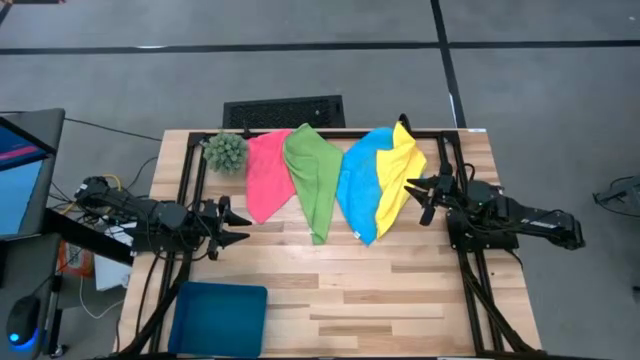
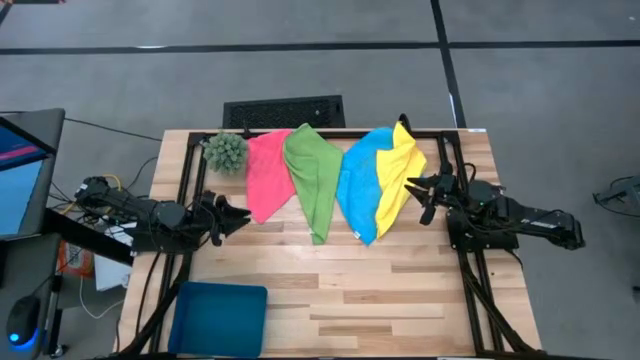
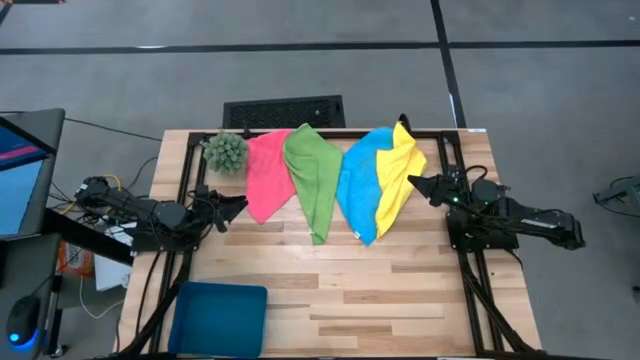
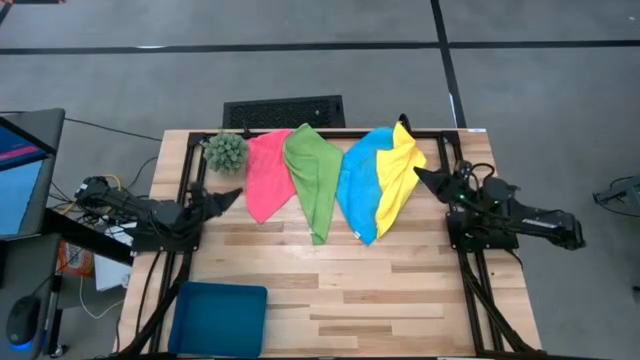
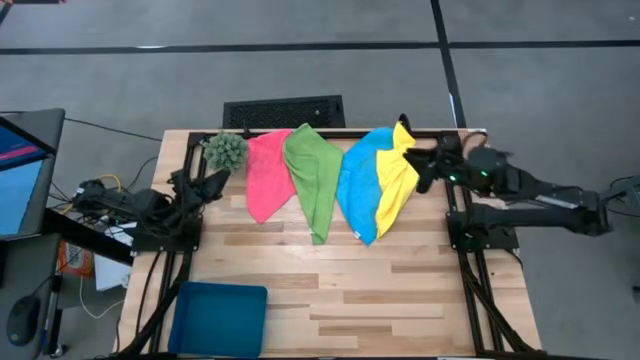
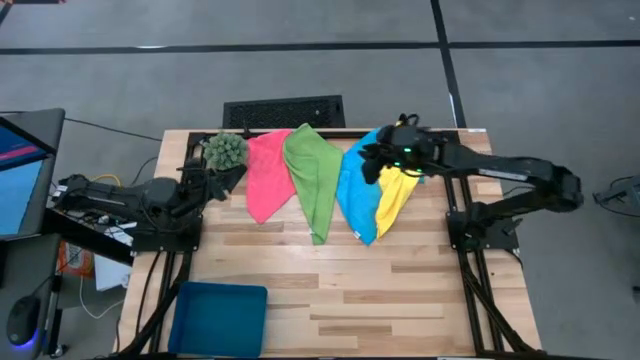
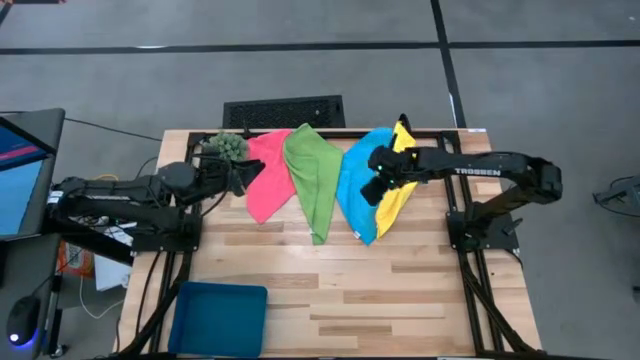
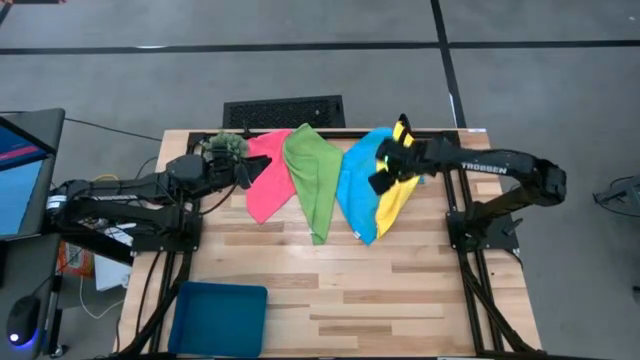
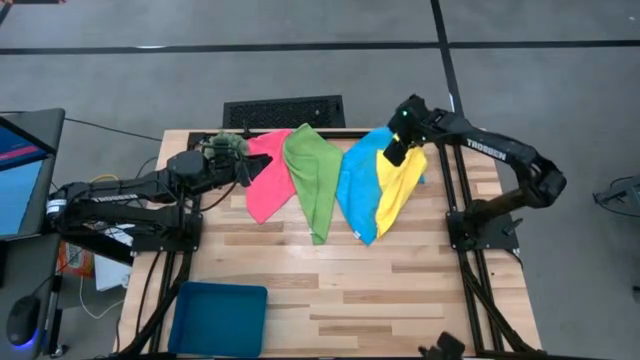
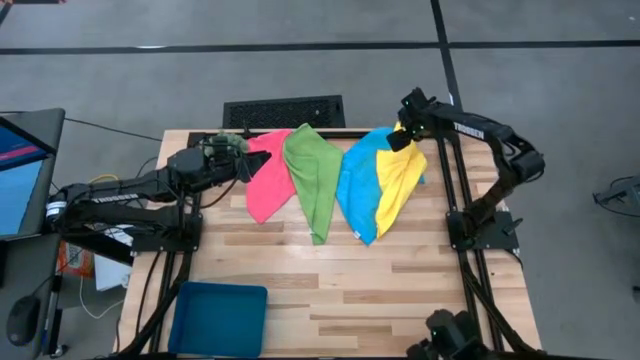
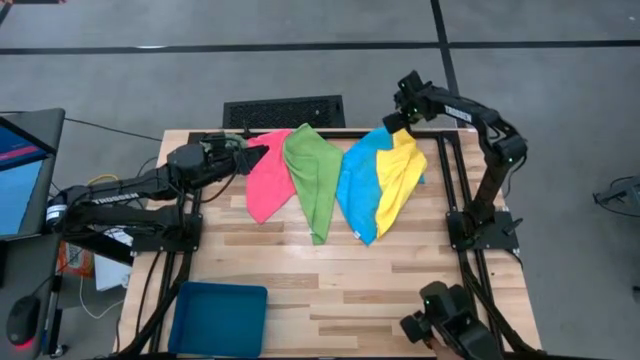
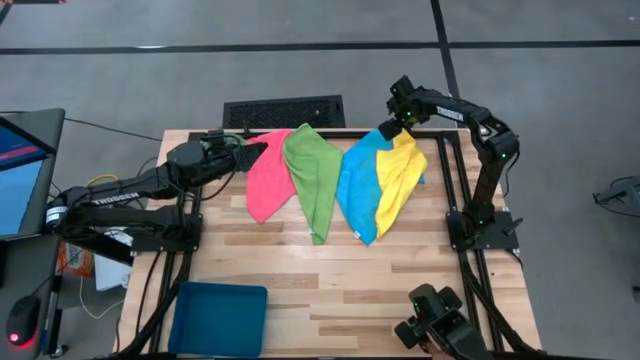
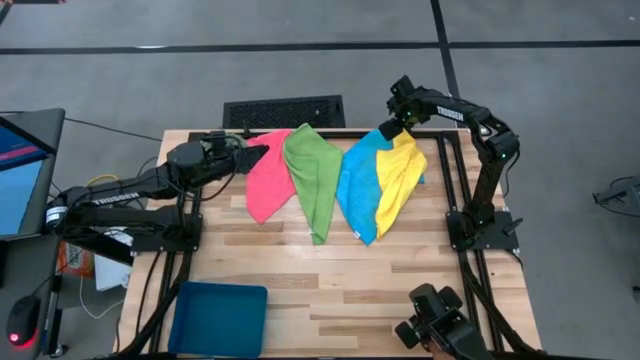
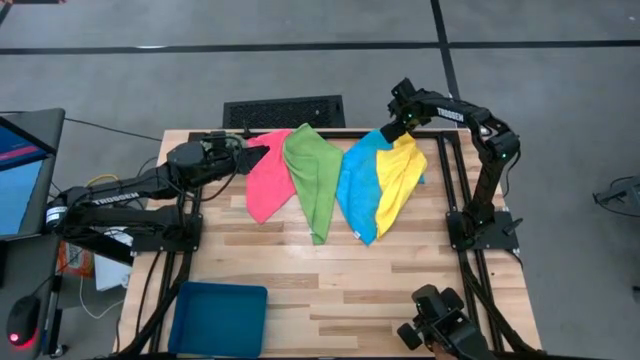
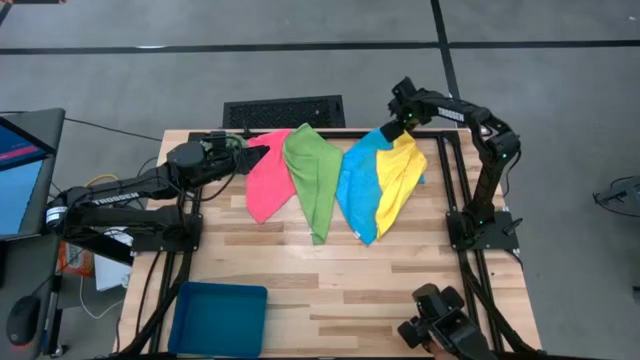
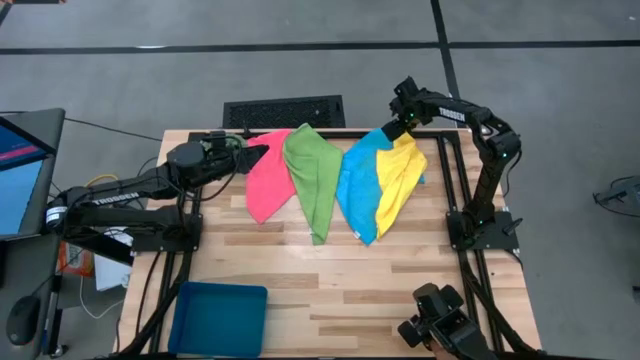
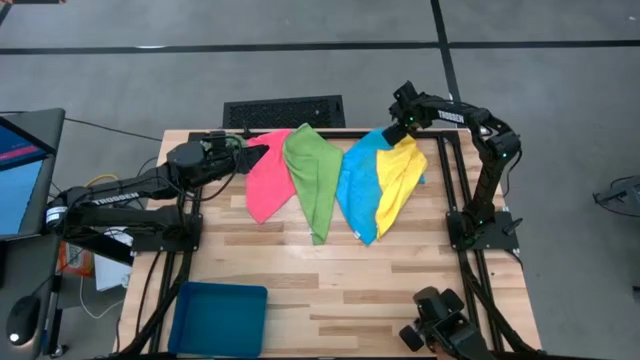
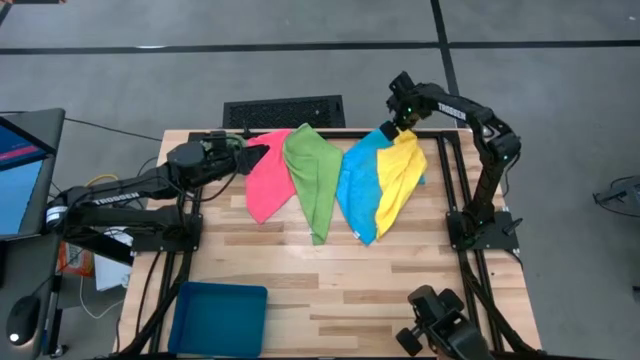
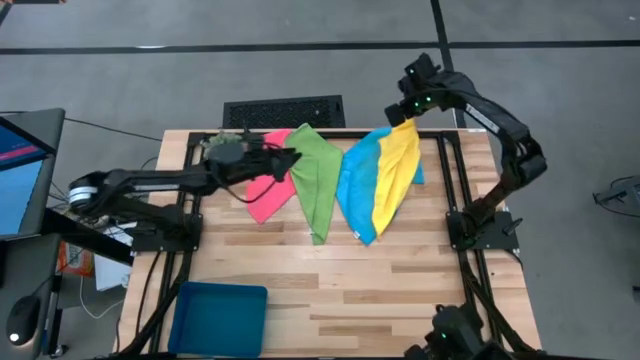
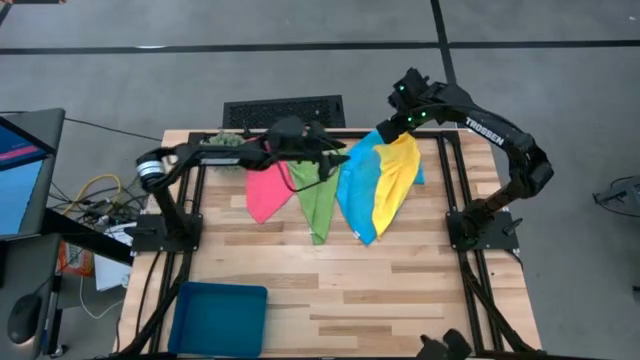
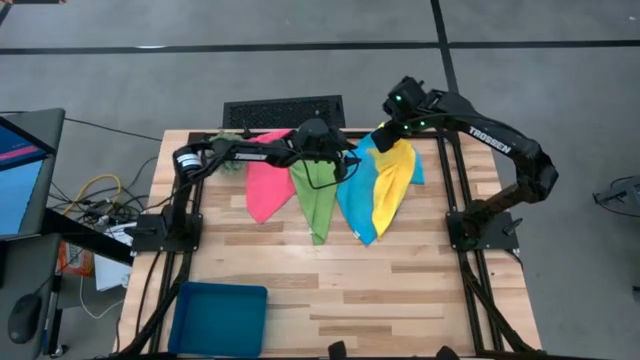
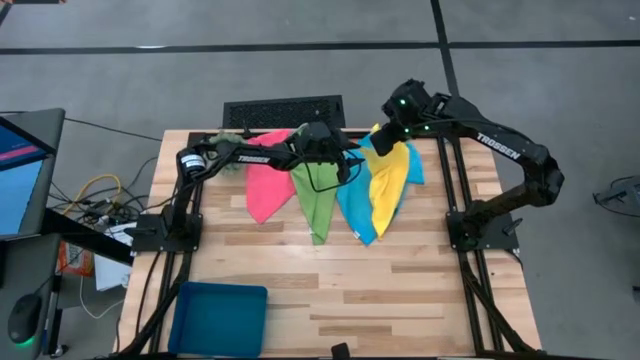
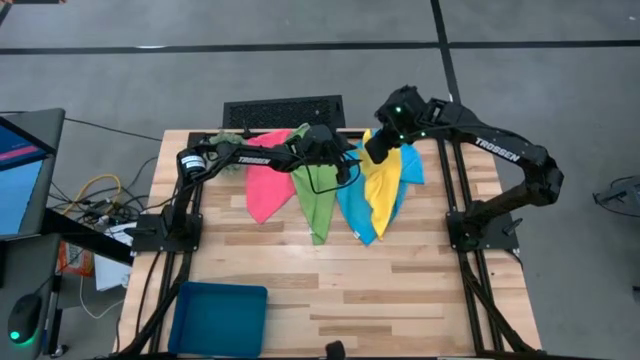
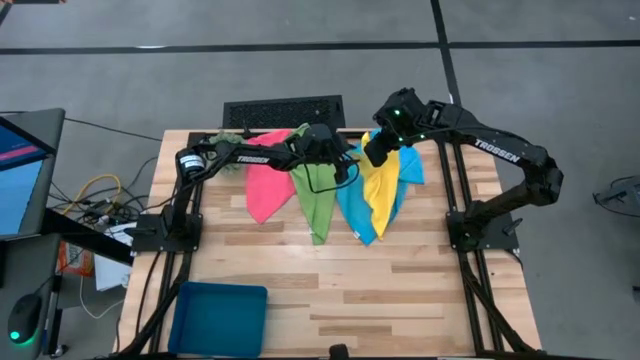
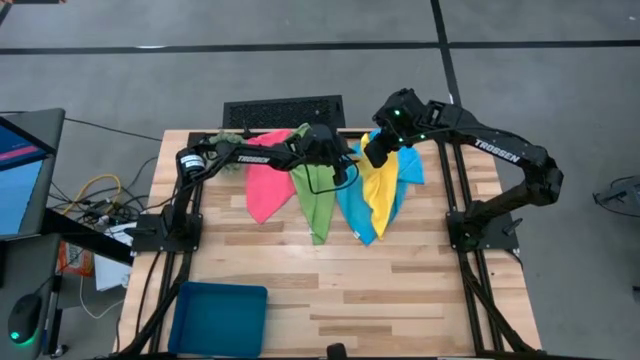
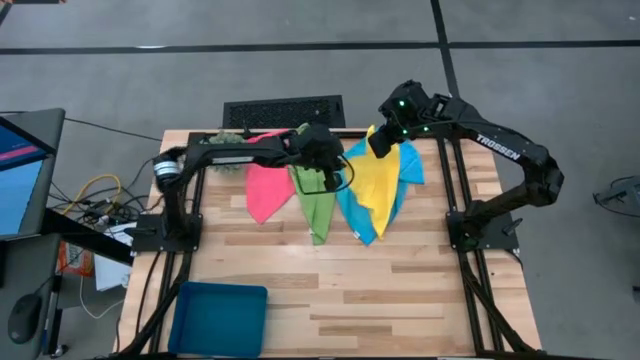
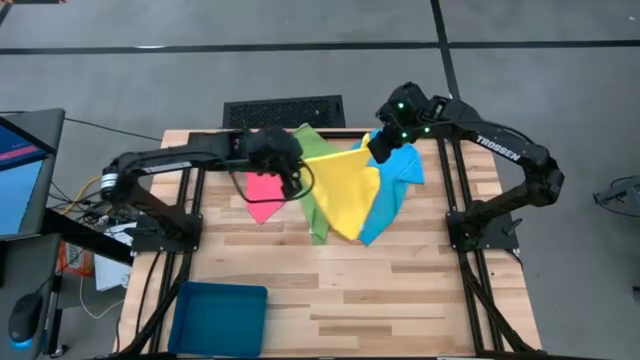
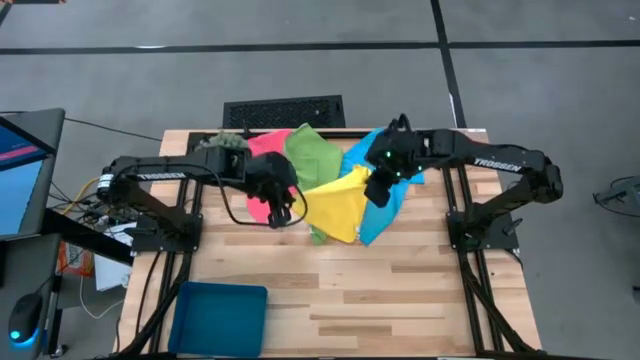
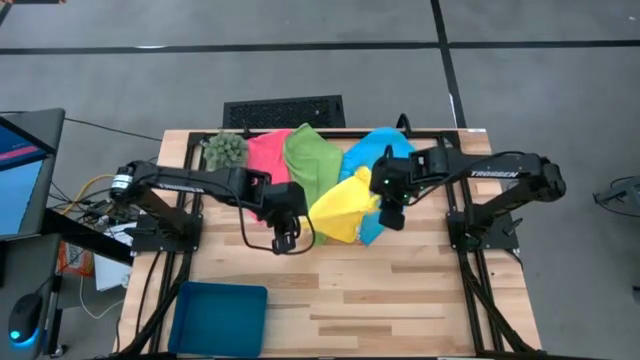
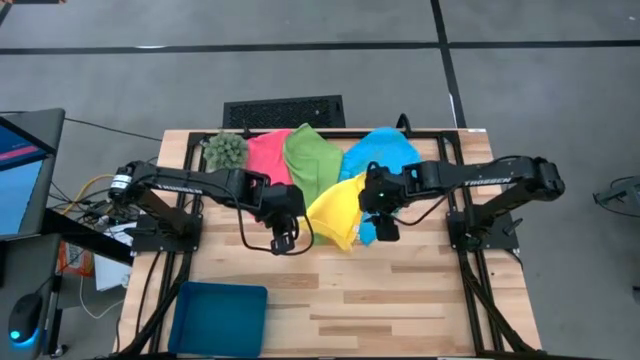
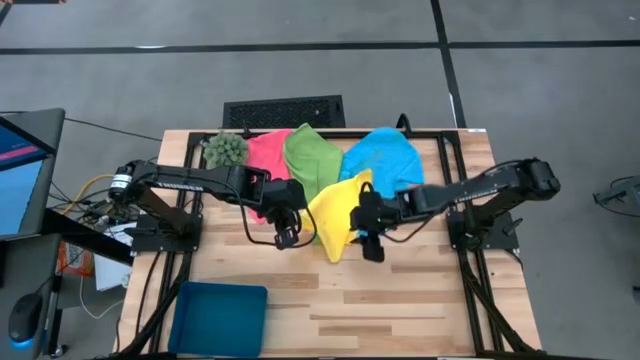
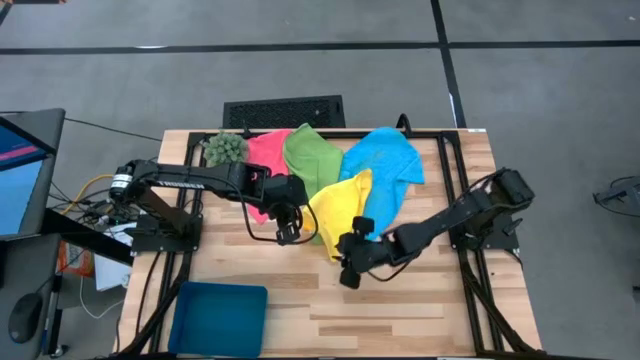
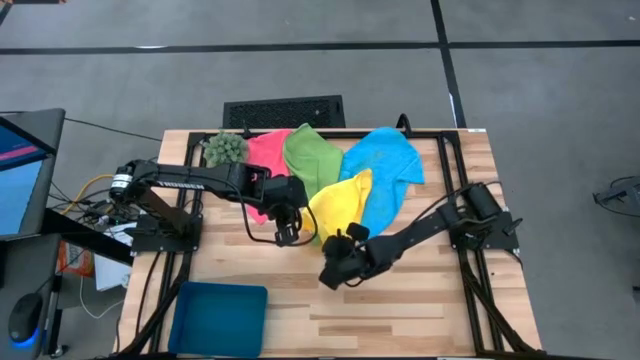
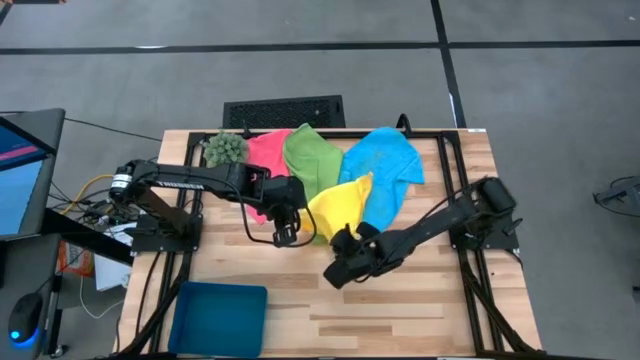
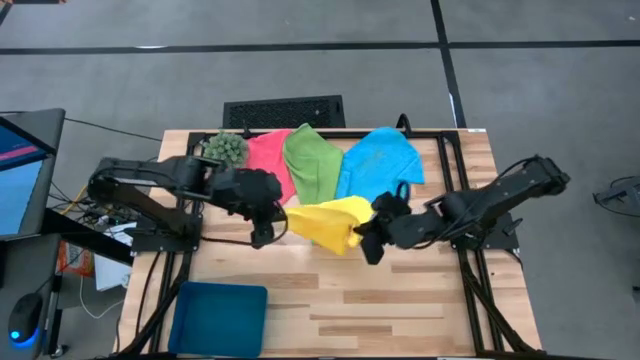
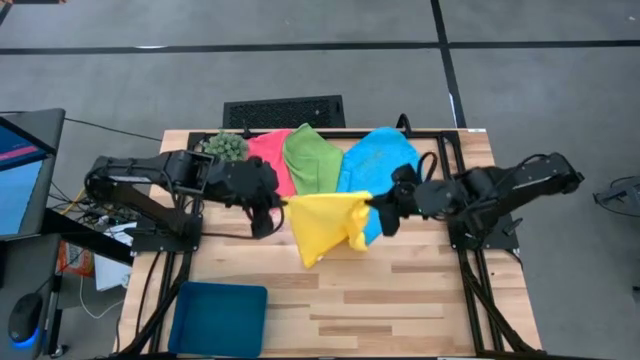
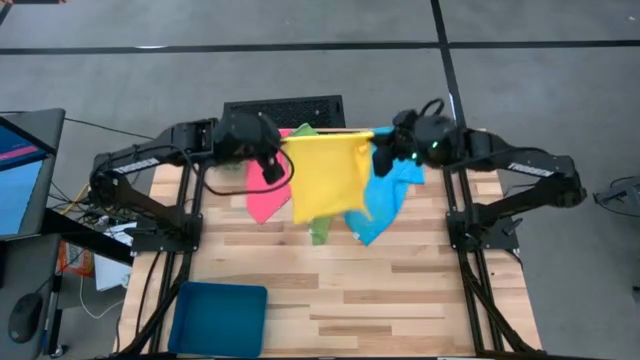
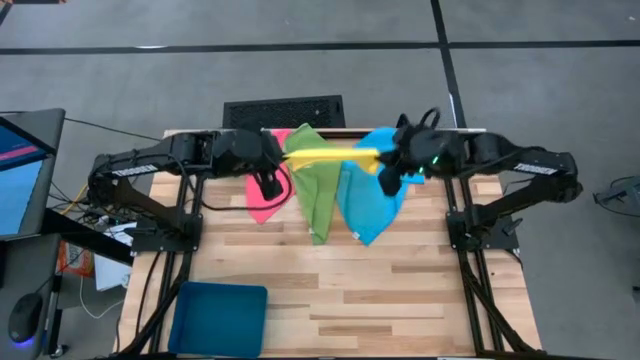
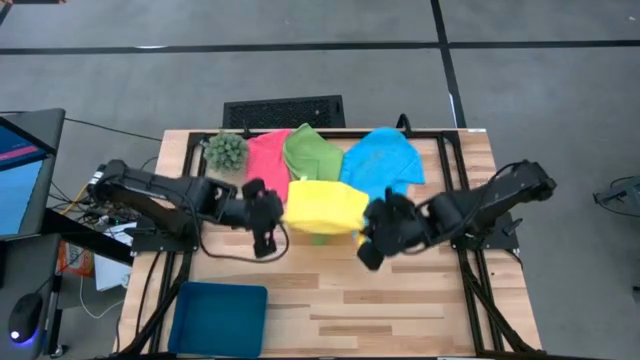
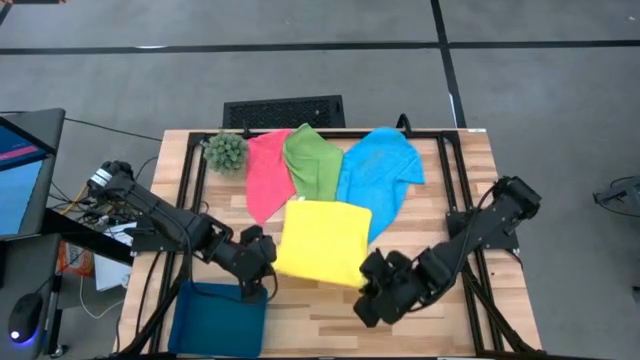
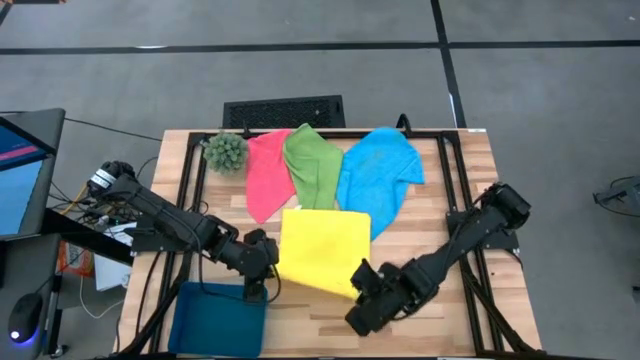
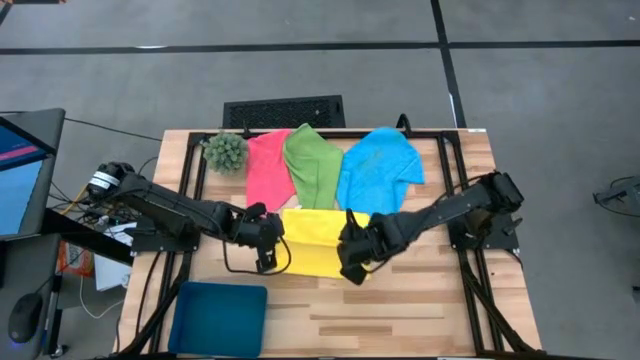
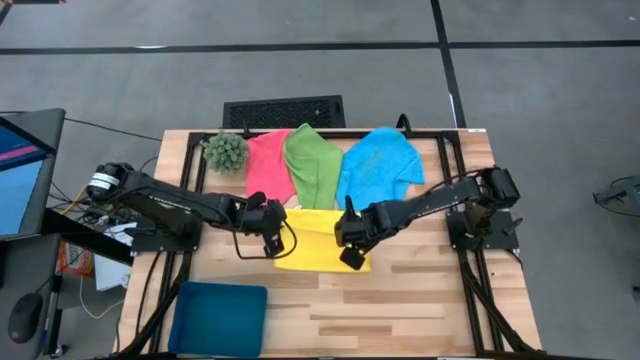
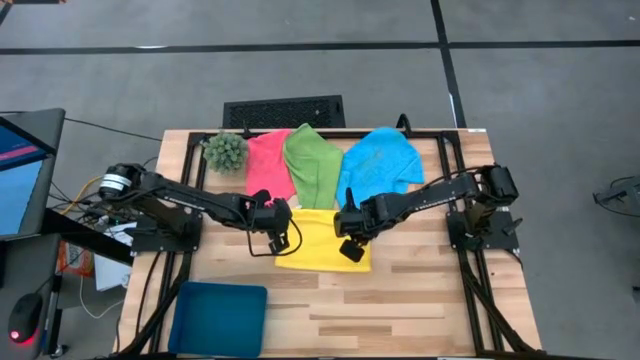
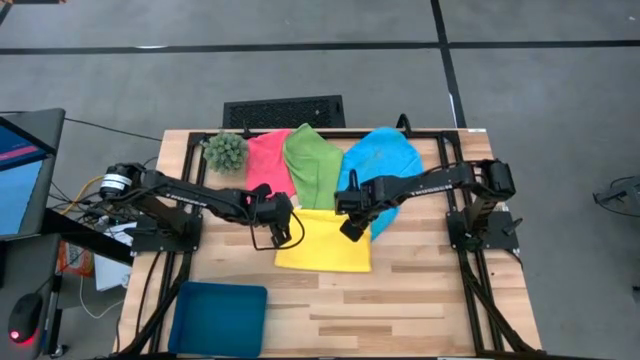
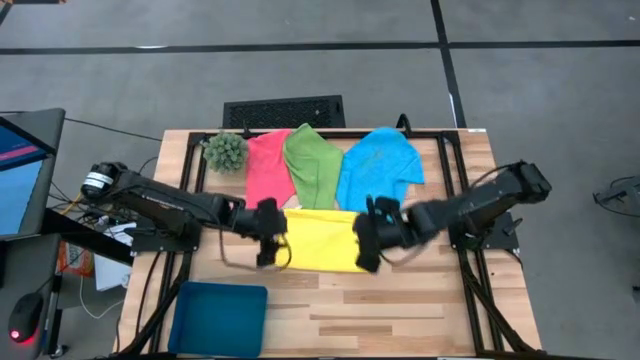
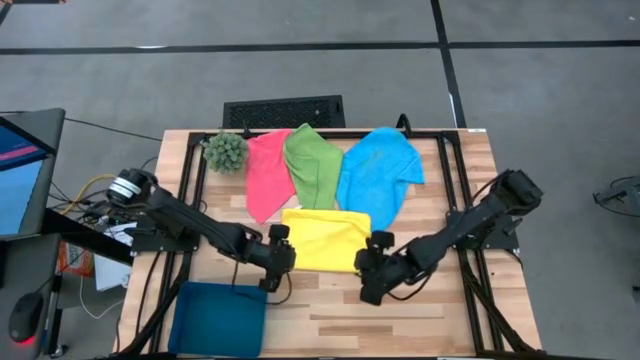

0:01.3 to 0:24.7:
Task: Fold microfiber towels
Fold the yellow microfiber towel
